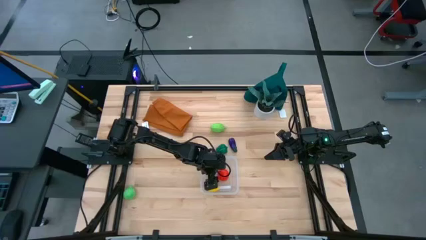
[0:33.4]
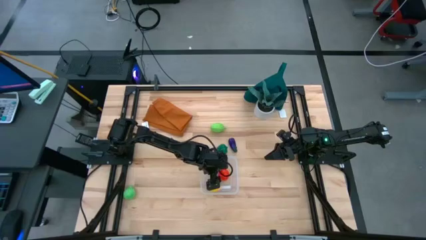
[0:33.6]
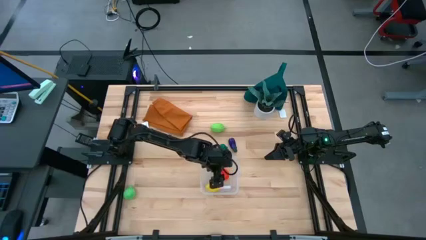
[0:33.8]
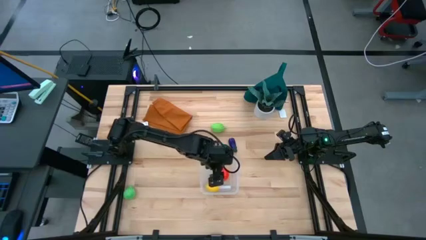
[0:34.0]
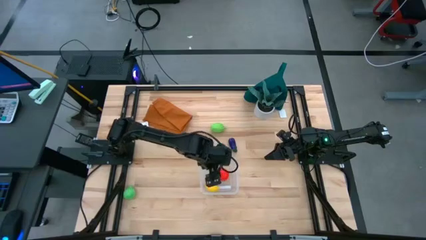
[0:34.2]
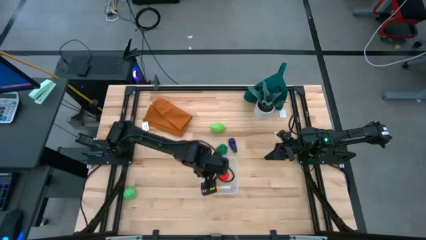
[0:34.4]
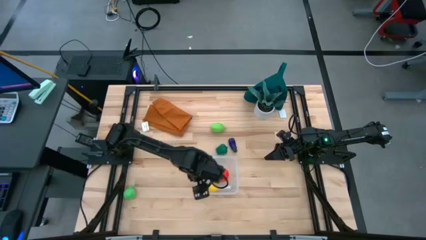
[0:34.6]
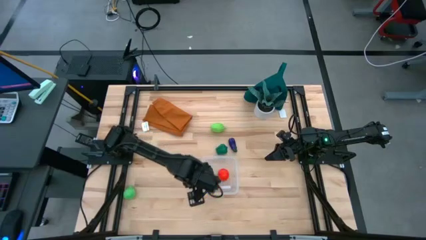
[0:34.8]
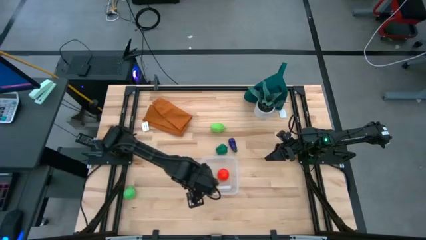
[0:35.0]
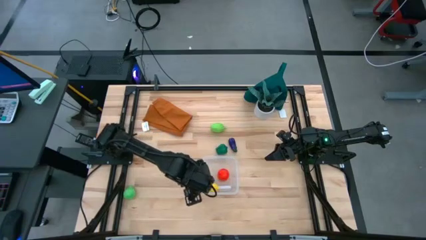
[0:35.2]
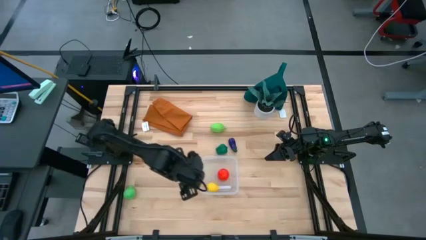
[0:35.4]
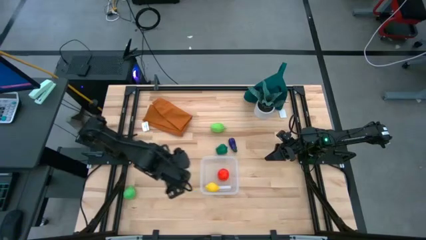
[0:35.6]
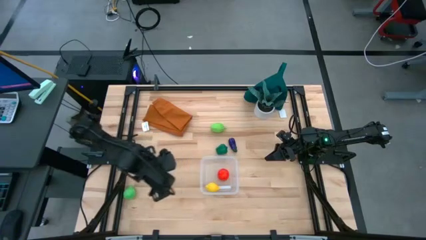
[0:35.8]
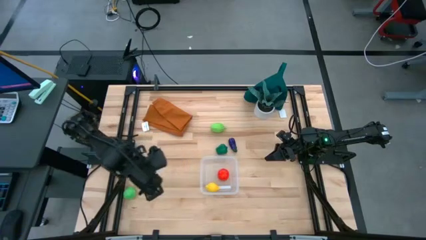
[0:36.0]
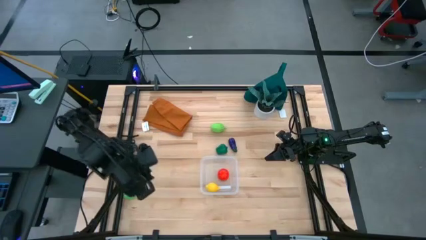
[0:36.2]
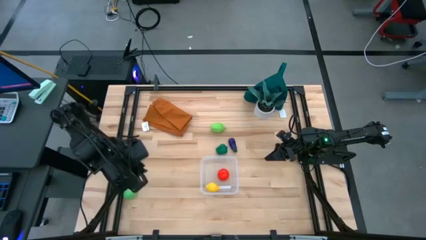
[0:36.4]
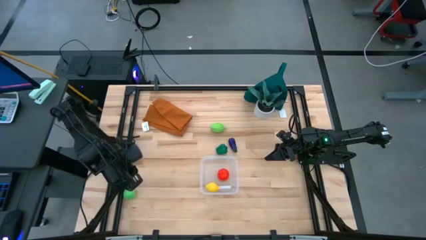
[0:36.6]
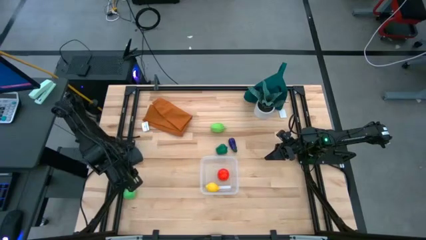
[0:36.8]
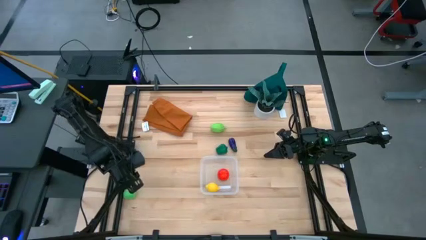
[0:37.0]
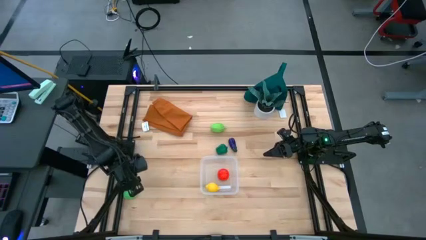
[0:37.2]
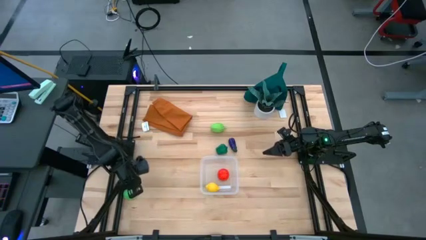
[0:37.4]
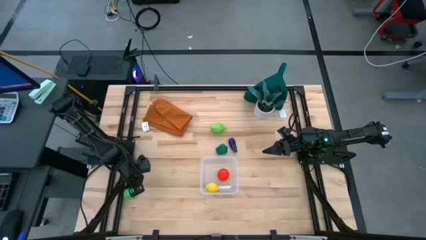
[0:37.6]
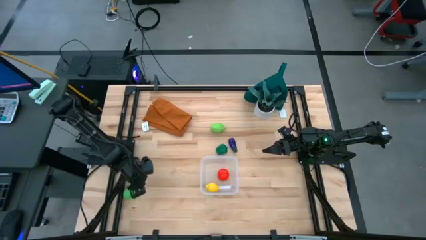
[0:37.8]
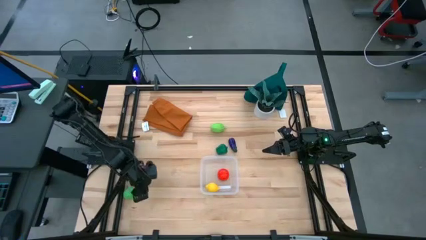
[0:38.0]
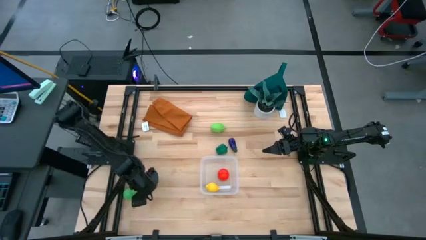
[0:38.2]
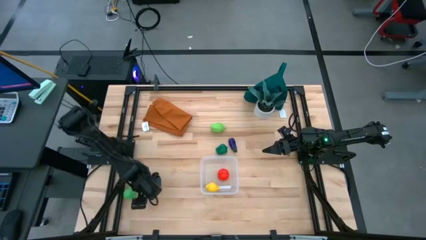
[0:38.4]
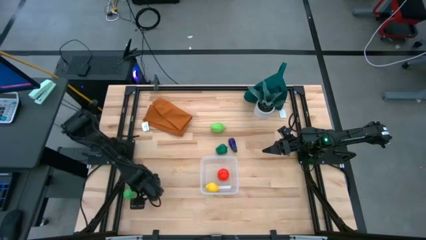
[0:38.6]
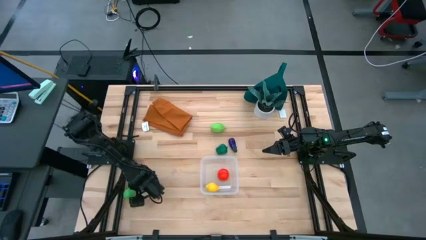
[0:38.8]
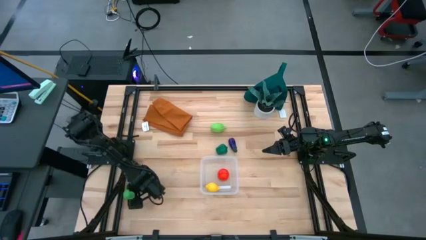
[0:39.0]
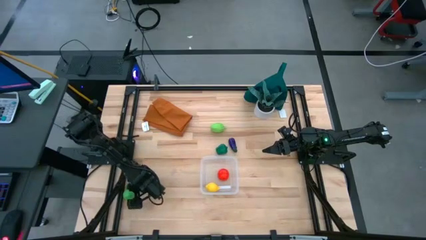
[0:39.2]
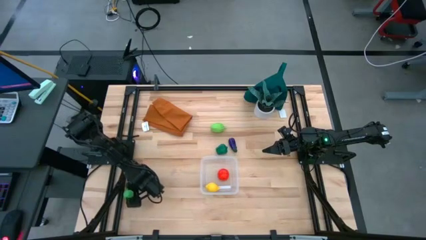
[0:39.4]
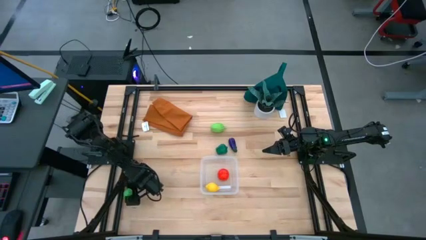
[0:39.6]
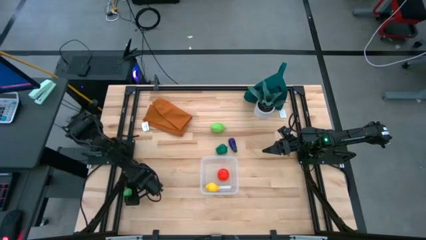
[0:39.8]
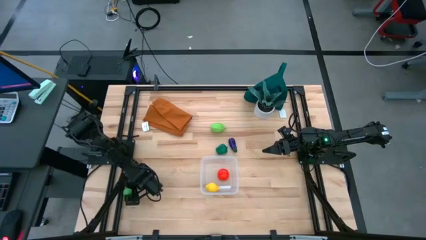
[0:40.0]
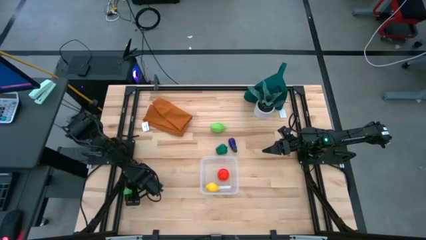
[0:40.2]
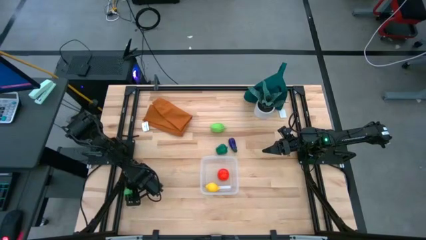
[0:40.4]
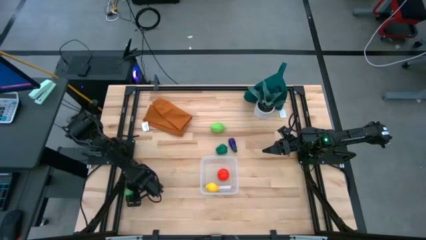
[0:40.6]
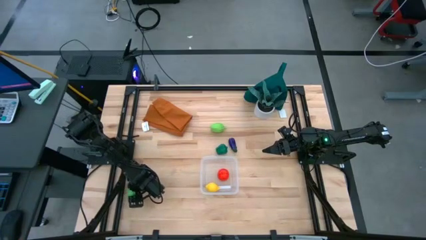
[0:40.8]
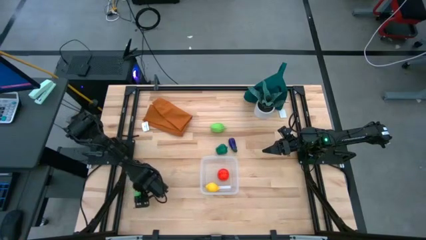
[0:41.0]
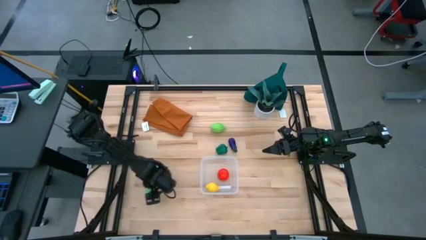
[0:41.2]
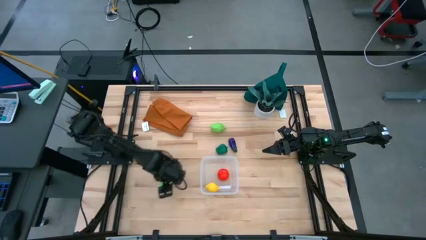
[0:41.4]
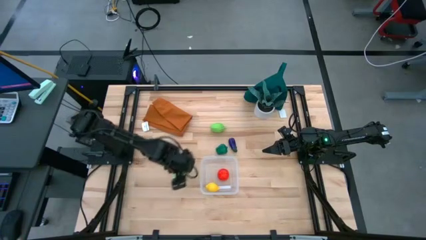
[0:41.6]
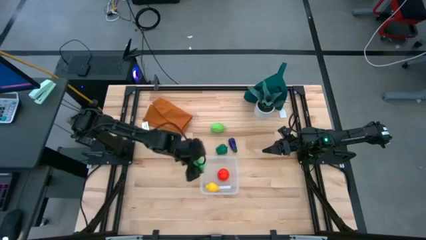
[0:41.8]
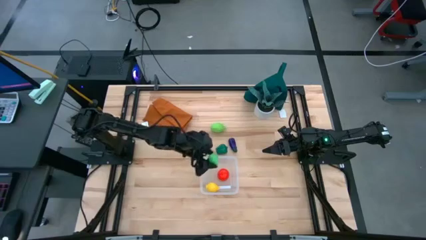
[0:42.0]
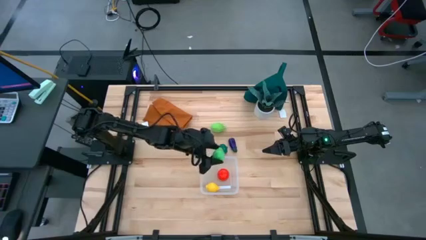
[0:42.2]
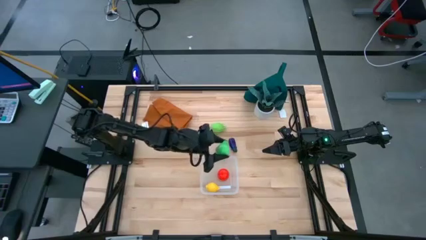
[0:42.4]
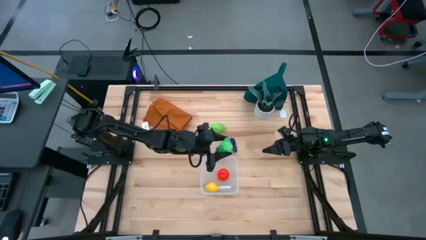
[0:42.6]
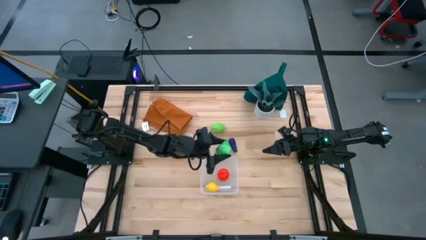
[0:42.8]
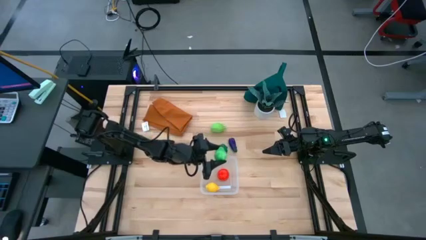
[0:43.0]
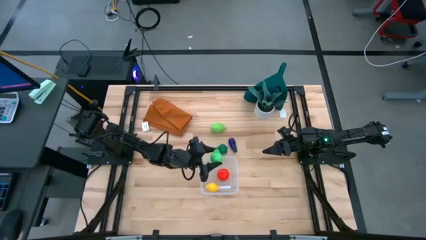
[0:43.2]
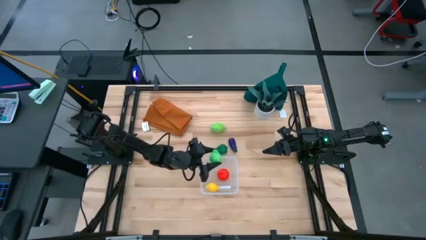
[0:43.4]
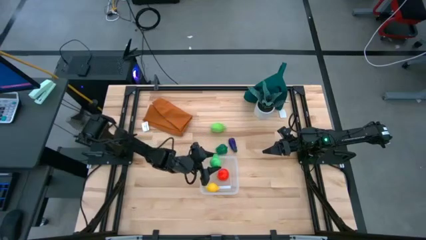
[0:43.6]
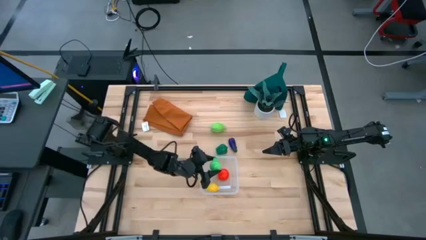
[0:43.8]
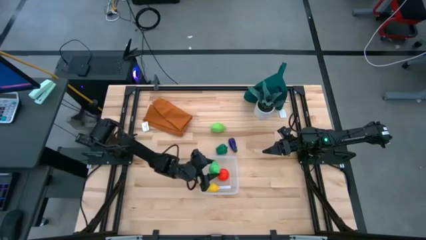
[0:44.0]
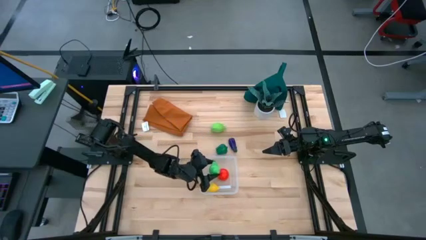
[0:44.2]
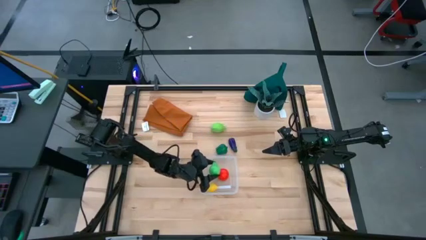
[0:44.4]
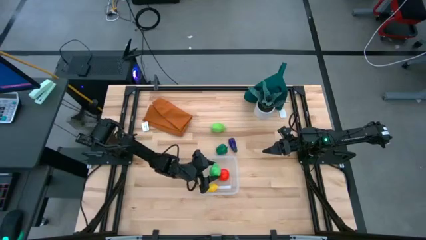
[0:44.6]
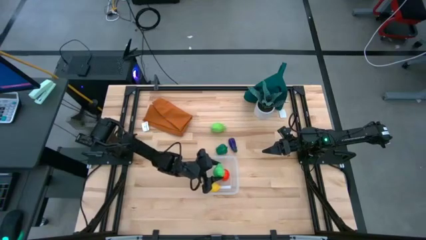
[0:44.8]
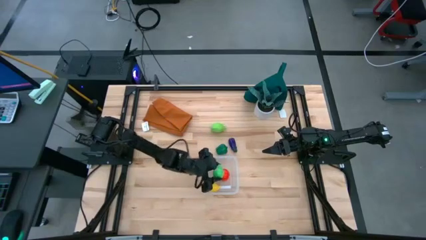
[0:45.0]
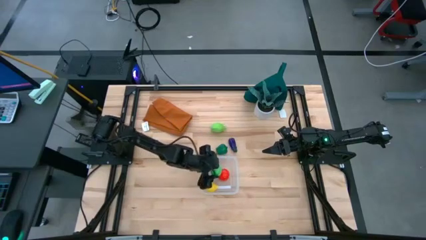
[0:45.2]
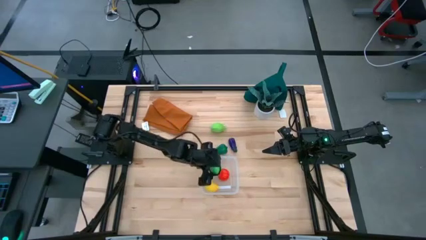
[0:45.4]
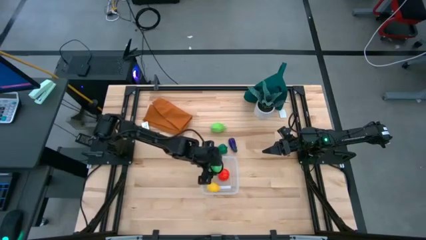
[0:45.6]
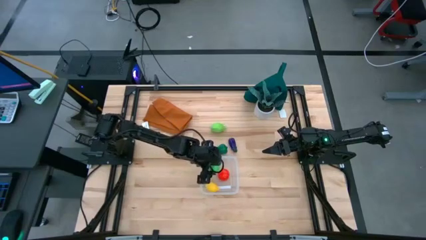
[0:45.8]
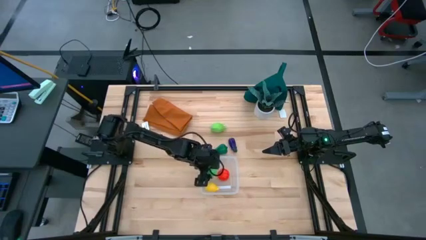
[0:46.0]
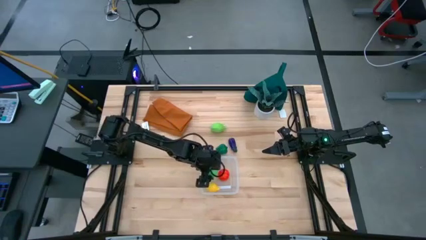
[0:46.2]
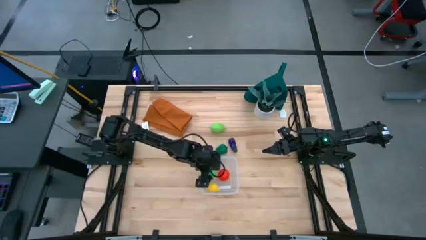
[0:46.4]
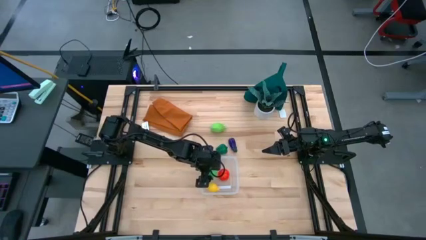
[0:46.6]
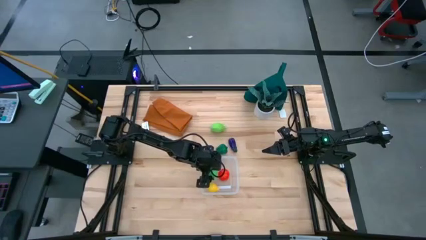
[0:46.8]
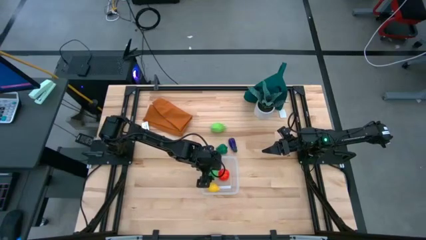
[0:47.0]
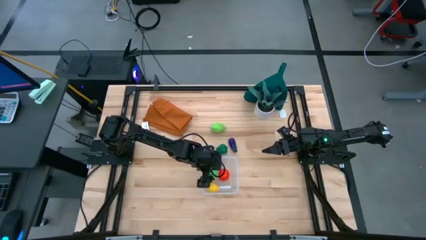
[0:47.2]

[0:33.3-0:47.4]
Task: Pick and placing Produce into tupperware
Put the pear into the transparent bin
